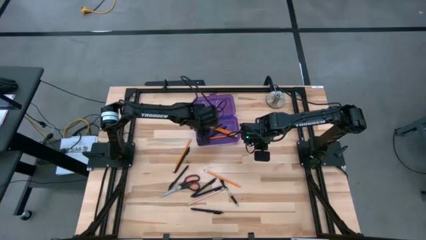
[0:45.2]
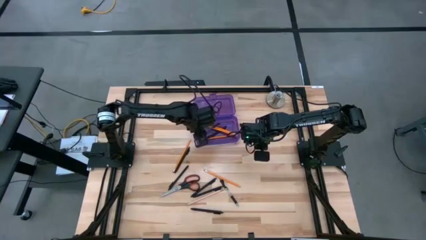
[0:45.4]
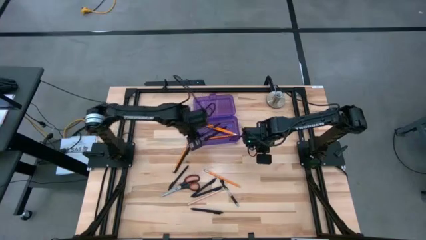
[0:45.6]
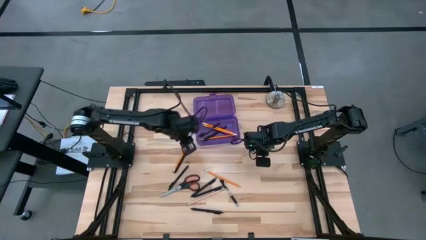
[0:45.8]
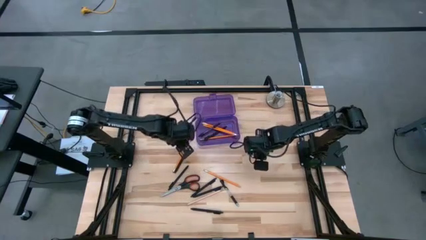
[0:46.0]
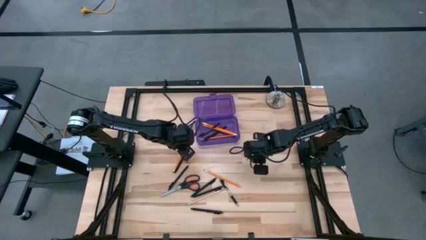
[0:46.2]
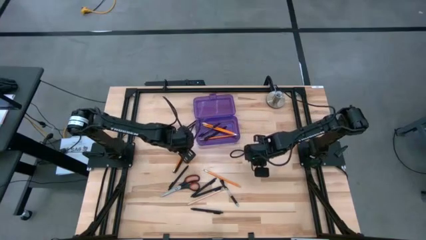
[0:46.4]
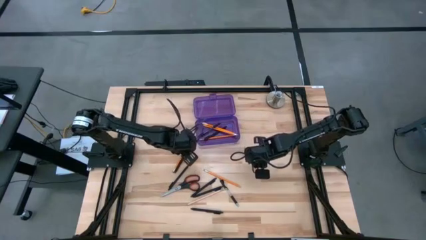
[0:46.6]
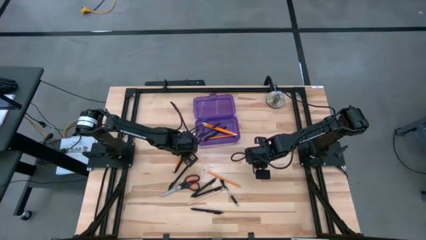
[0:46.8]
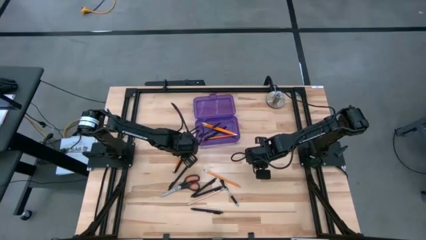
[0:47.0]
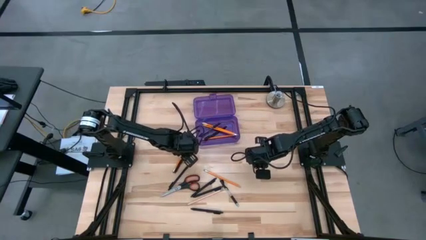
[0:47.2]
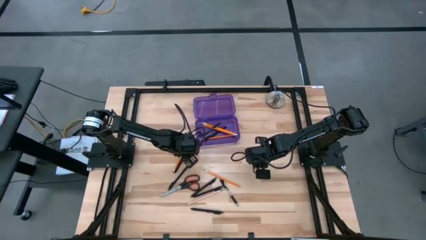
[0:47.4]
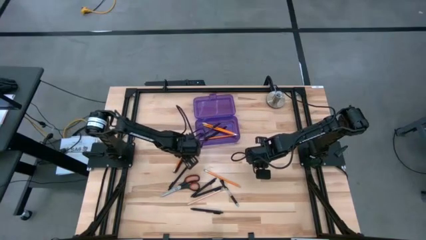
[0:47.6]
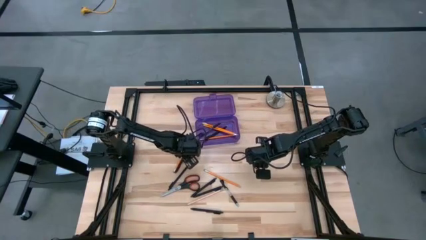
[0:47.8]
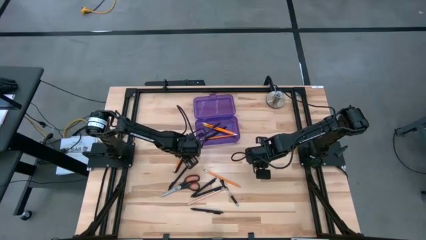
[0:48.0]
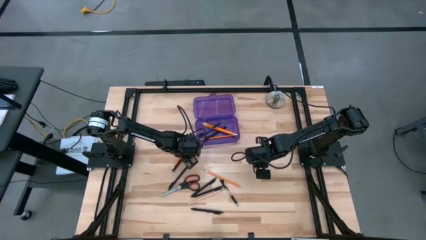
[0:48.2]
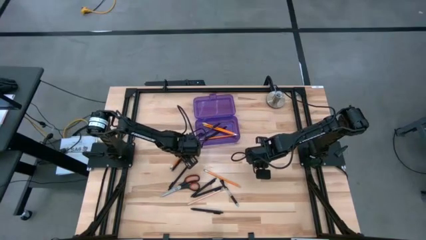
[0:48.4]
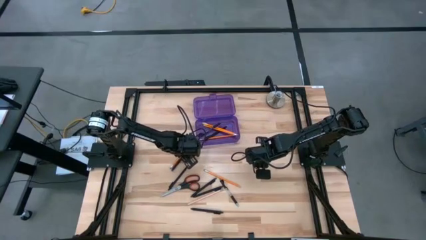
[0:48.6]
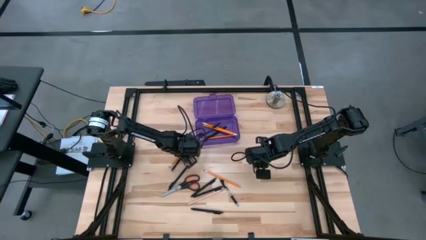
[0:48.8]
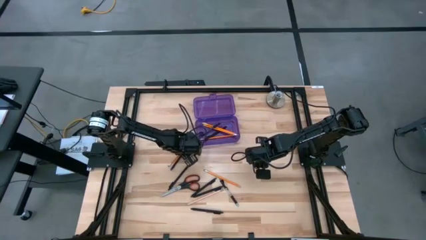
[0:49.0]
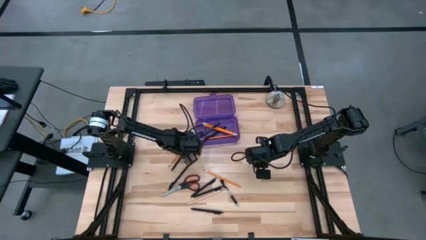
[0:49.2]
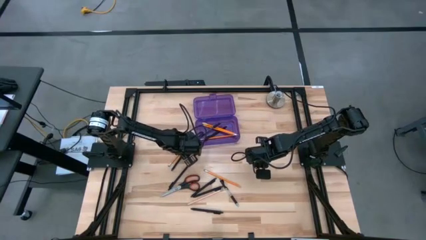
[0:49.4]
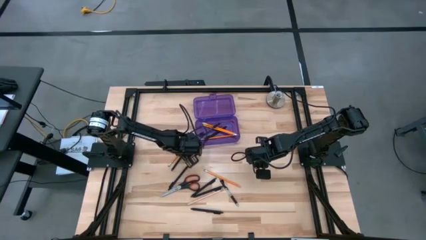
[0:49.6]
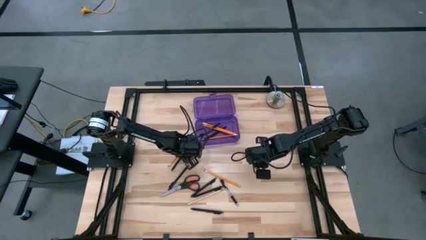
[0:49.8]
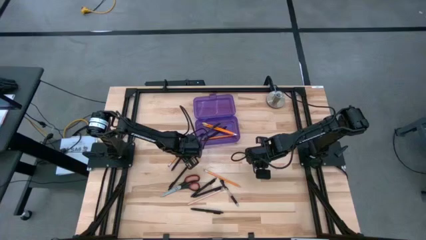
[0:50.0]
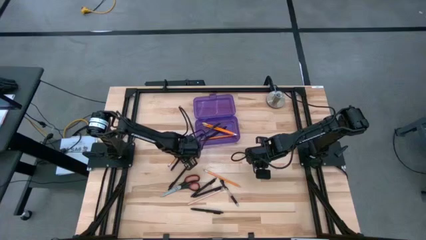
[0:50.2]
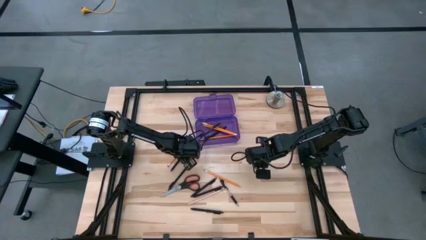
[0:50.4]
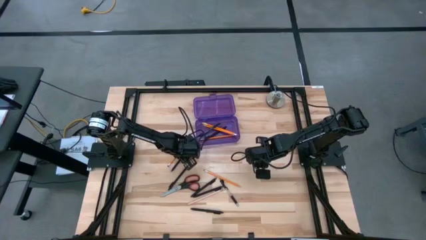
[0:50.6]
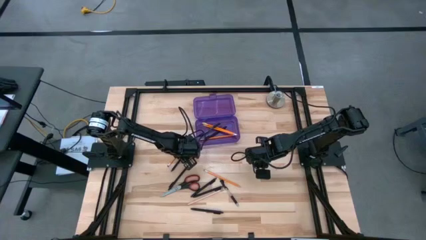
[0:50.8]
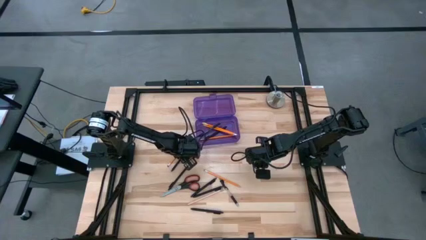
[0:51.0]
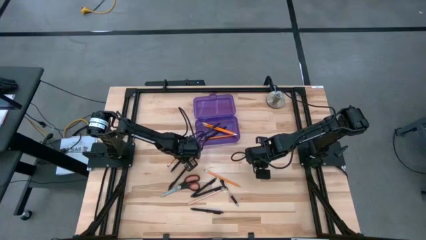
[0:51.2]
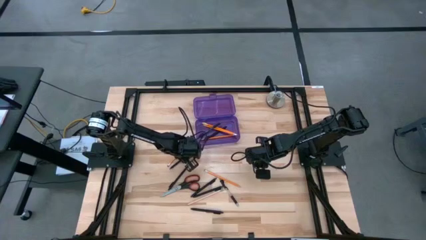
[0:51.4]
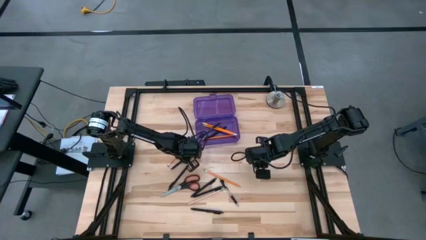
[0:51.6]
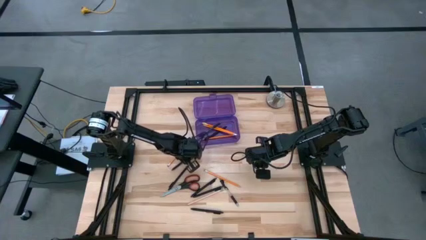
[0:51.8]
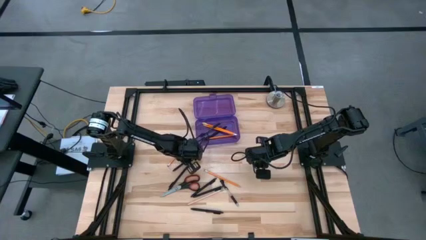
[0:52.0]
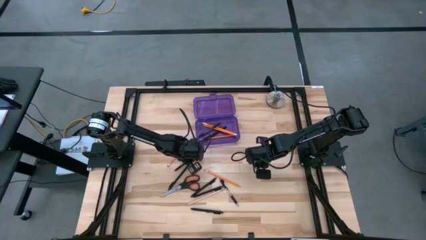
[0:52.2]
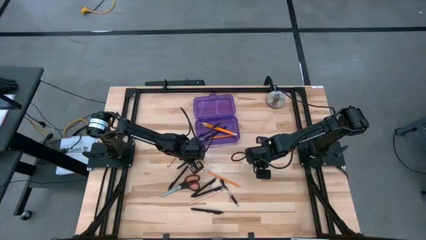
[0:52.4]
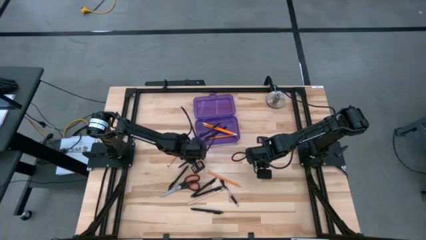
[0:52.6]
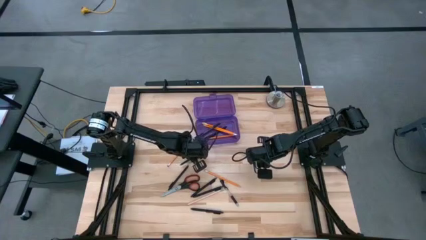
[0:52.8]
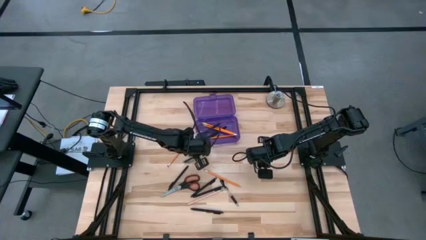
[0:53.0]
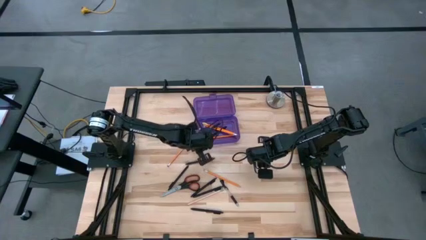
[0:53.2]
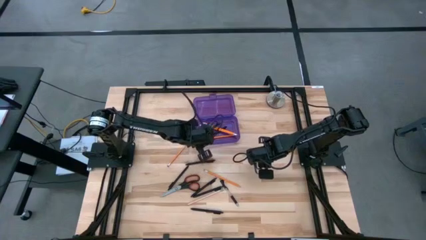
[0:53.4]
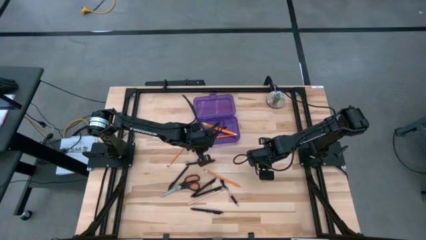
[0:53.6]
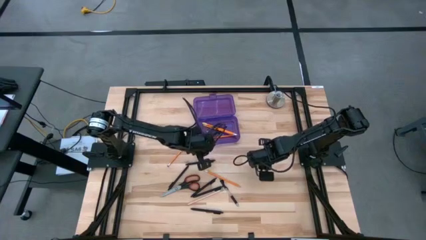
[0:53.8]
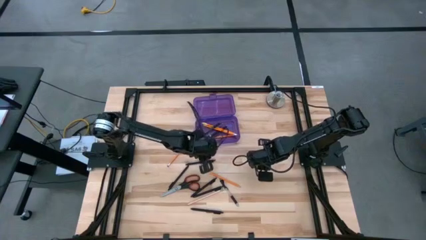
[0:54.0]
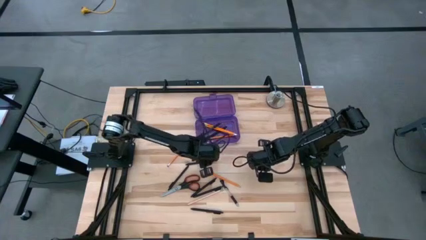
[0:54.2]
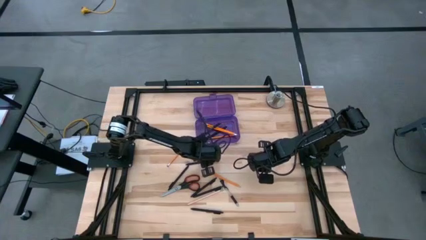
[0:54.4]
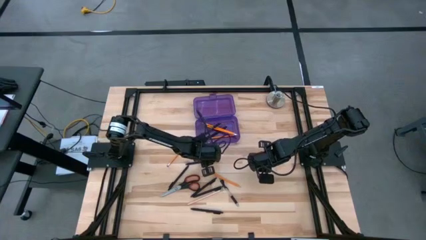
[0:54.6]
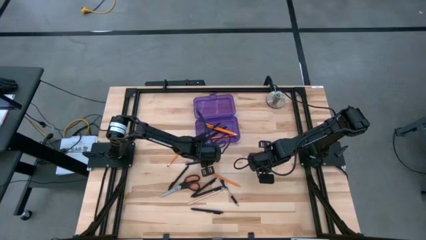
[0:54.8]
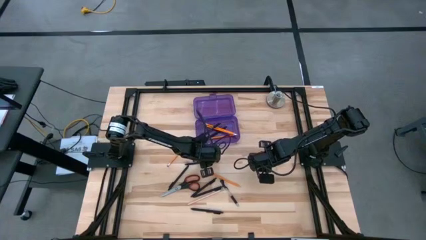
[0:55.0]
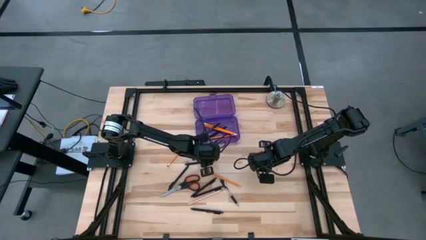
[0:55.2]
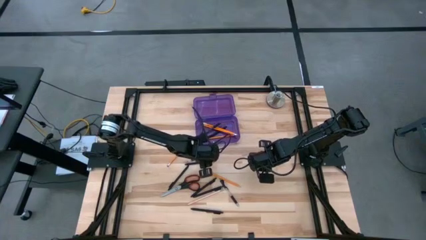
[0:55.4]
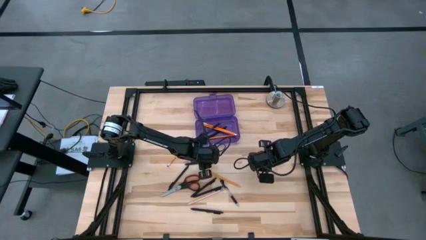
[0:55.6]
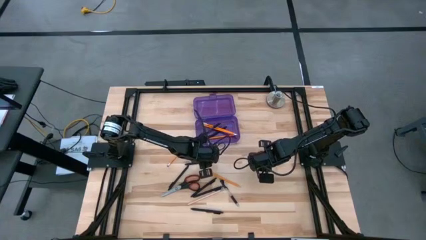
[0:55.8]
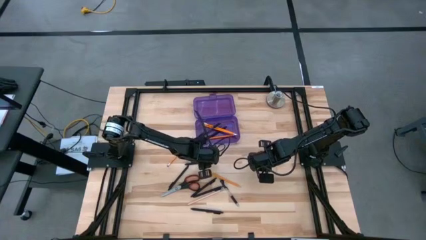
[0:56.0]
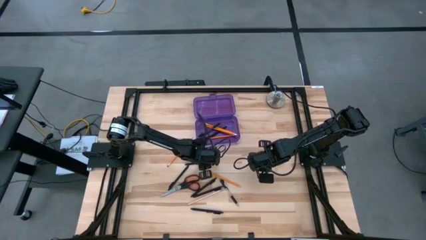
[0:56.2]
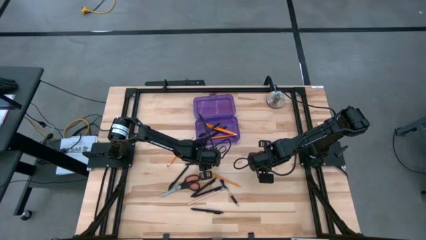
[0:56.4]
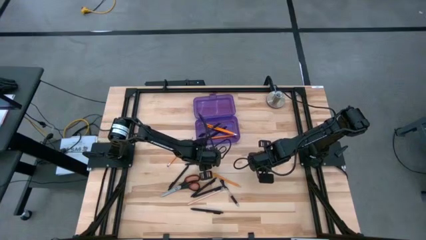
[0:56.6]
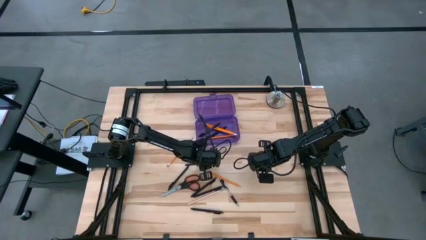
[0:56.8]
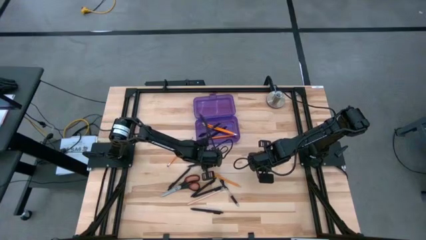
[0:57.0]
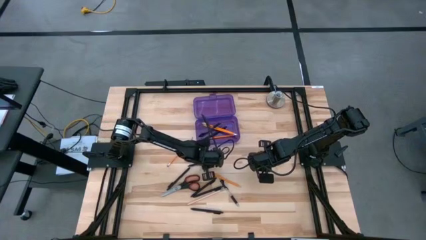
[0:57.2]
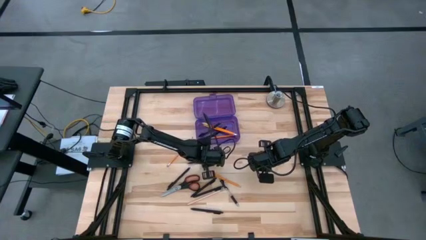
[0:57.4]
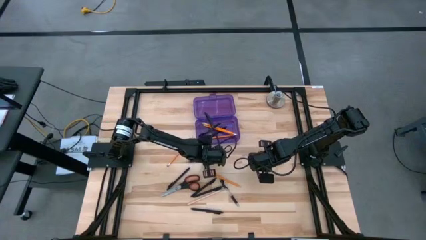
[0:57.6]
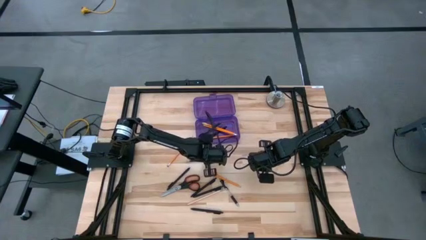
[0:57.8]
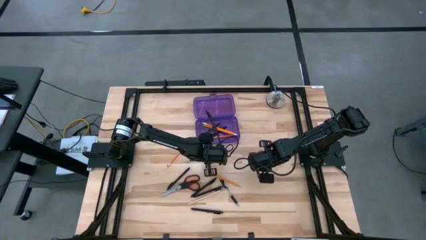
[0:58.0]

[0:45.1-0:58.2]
Task: Pick & place school supplies into a supply box
Put the black pen into the purple supply box

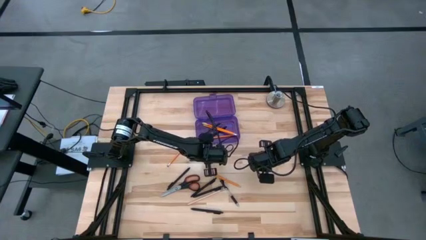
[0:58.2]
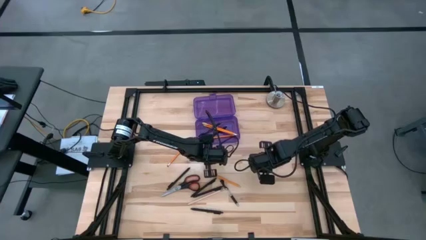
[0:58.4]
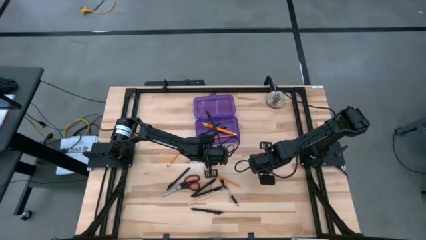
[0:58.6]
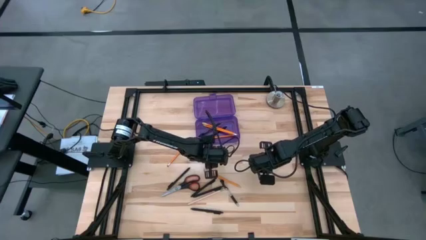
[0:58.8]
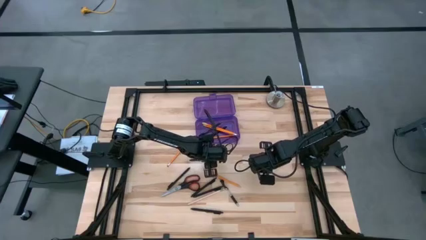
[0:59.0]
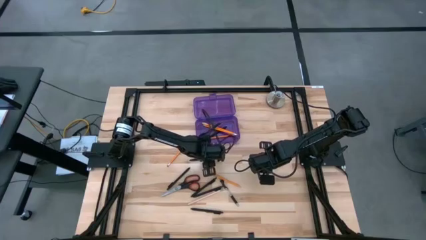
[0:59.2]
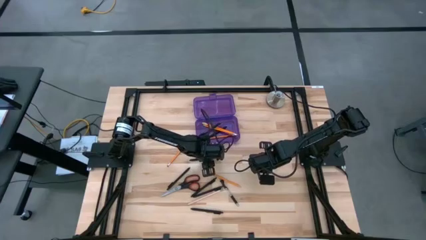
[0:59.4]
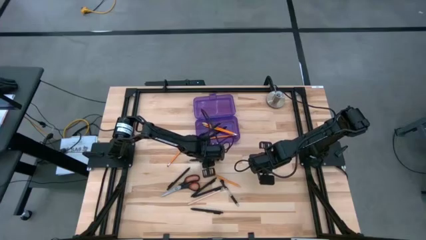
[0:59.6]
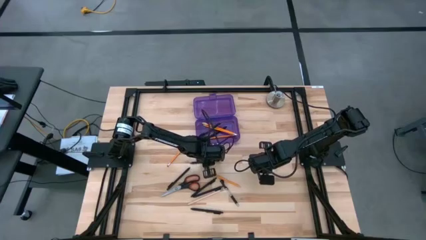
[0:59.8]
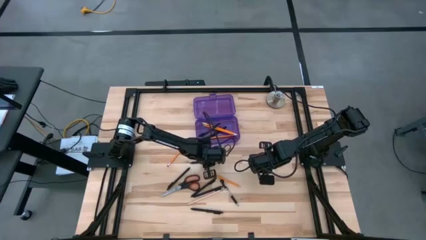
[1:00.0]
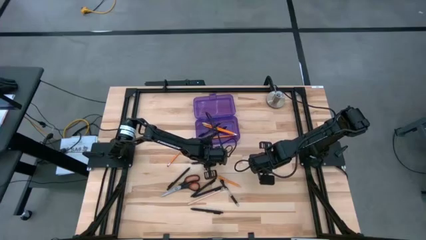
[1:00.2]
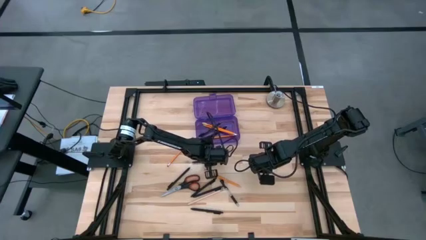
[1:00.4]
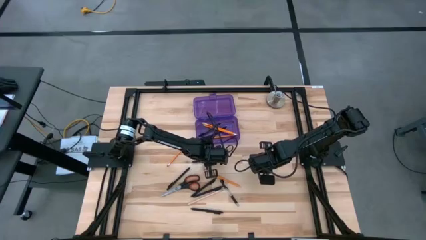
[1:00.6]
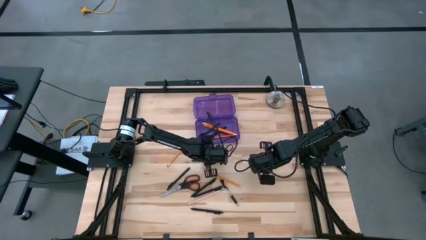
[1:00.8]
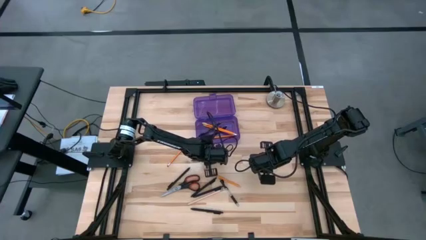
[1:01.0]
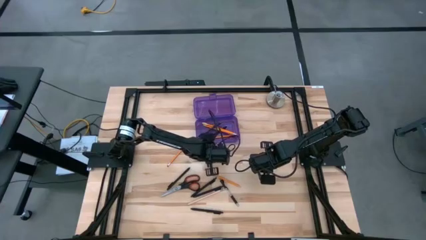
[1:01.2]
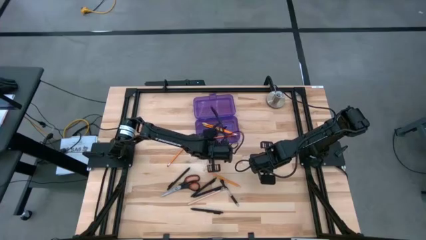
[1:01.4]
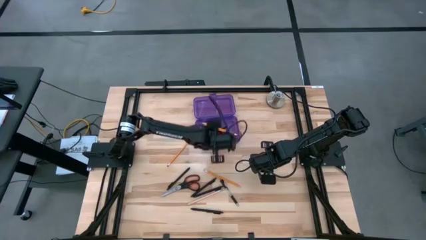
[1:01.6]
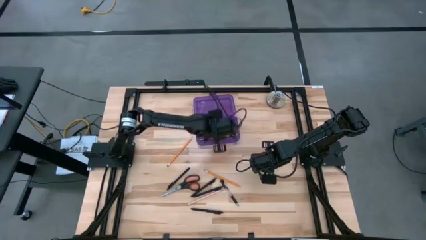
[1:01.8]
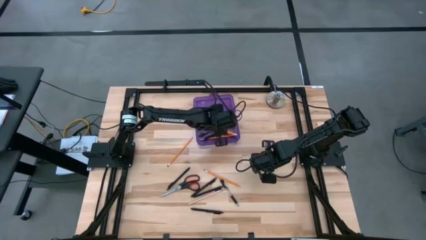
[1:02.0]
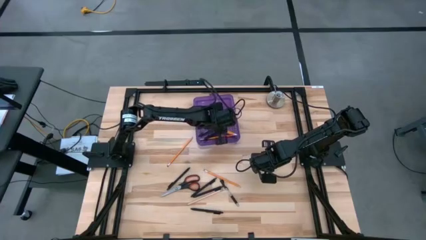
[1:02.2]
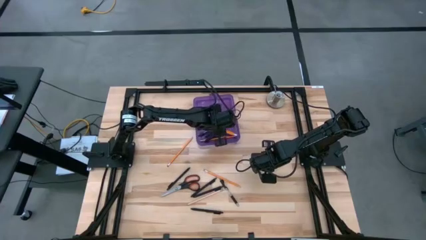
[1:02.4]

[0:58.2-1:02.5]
Put the black pen into the purple supply box
